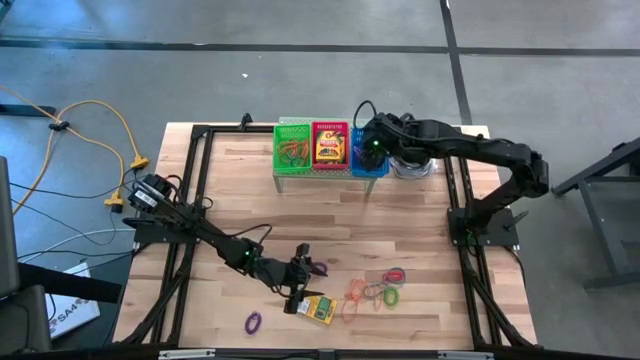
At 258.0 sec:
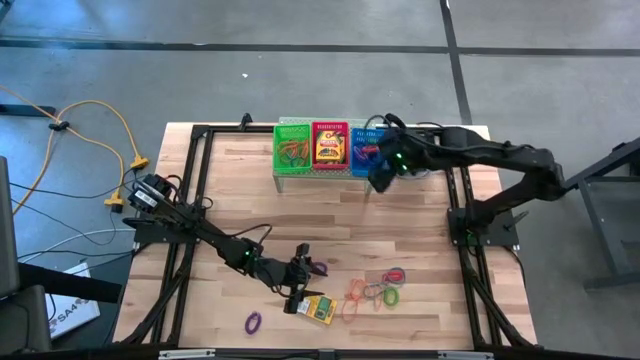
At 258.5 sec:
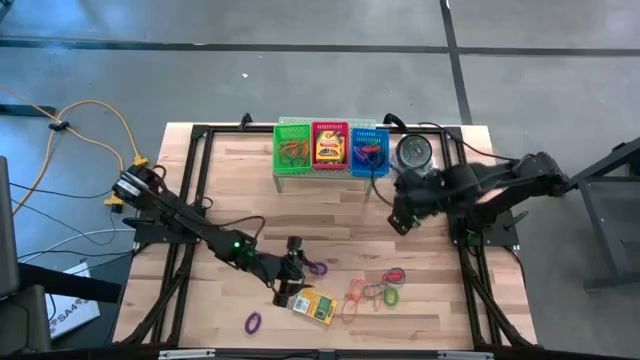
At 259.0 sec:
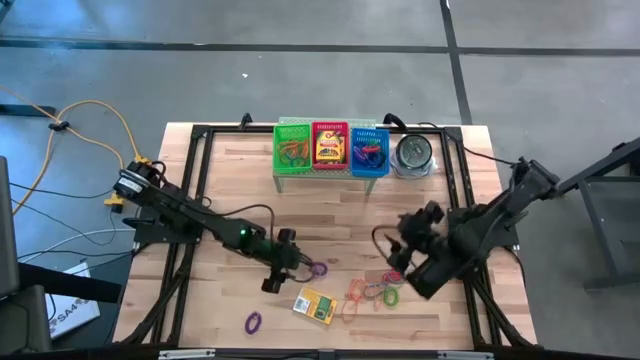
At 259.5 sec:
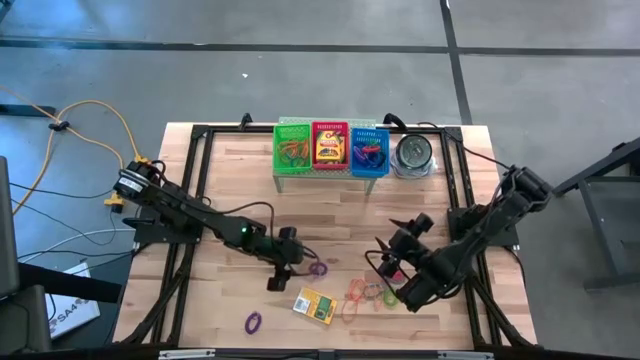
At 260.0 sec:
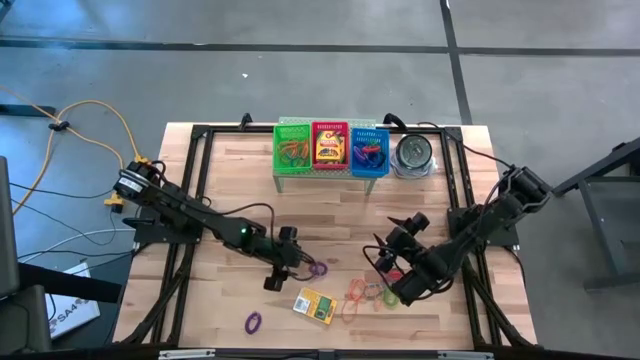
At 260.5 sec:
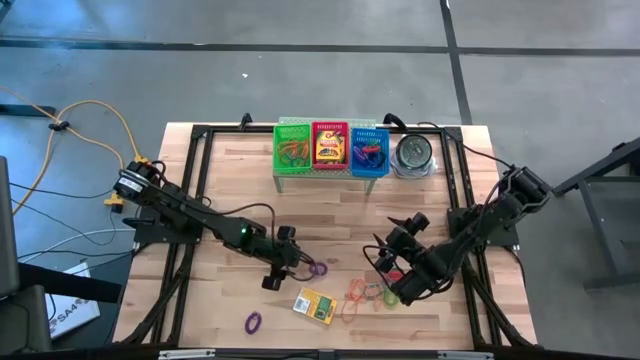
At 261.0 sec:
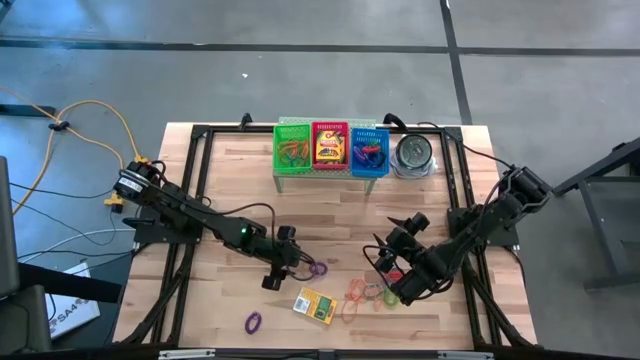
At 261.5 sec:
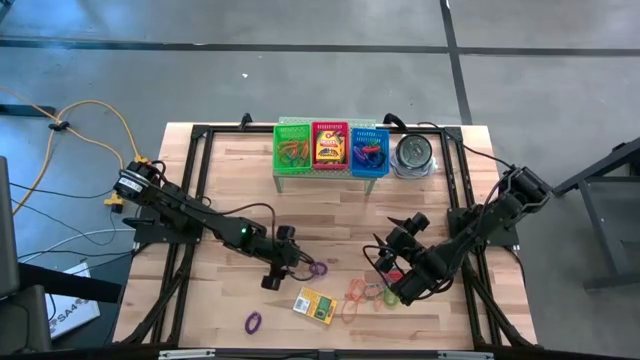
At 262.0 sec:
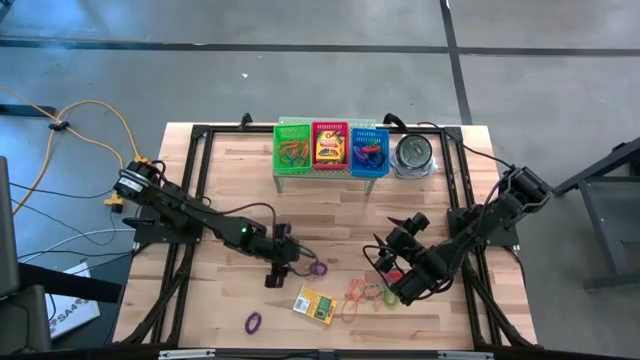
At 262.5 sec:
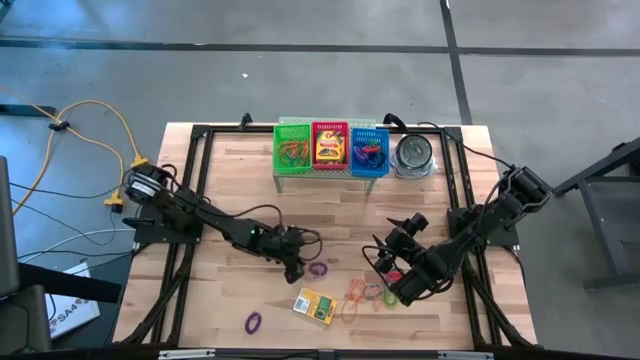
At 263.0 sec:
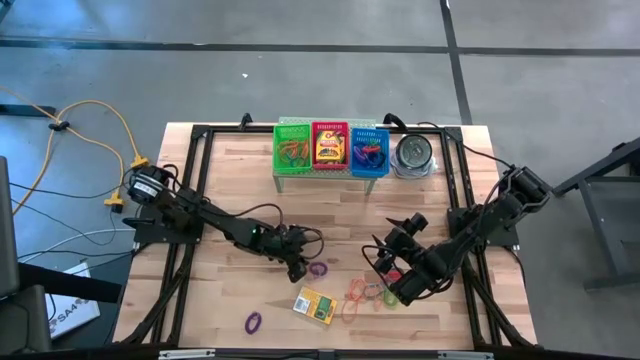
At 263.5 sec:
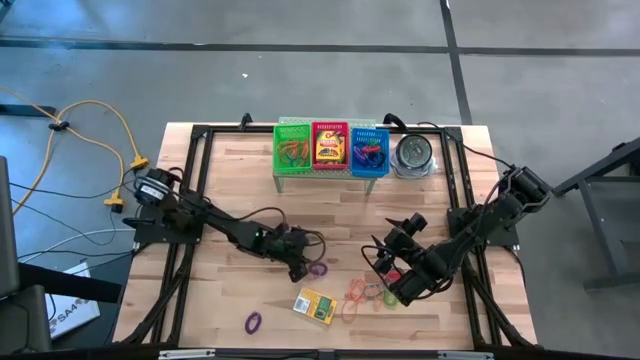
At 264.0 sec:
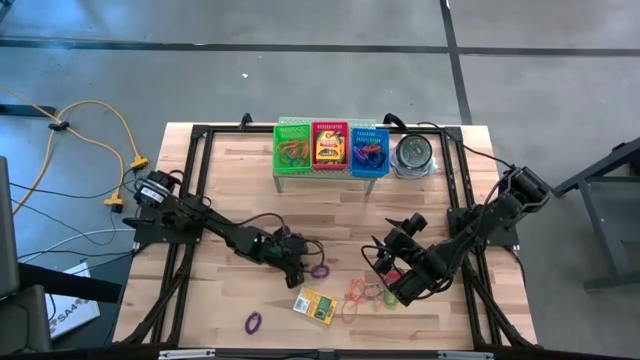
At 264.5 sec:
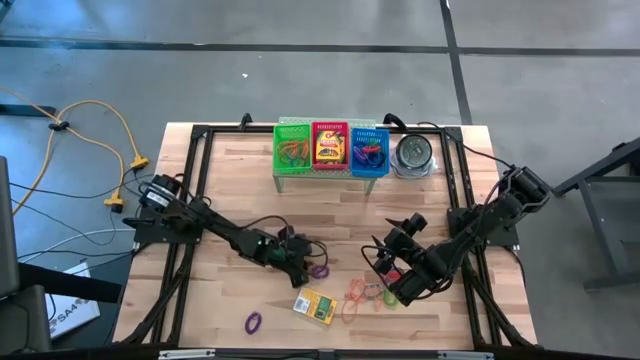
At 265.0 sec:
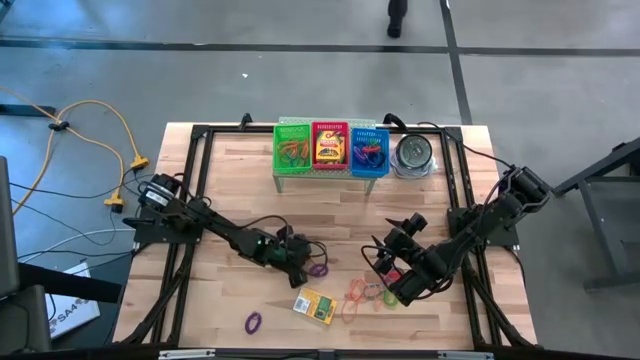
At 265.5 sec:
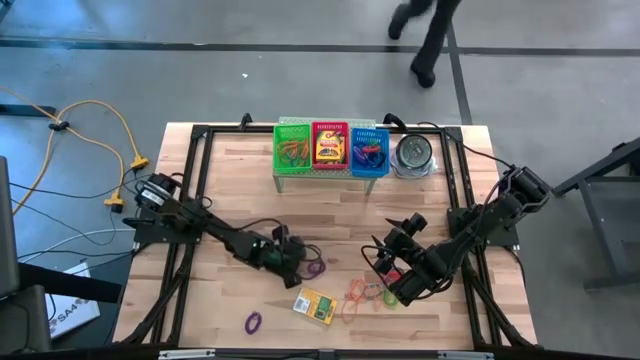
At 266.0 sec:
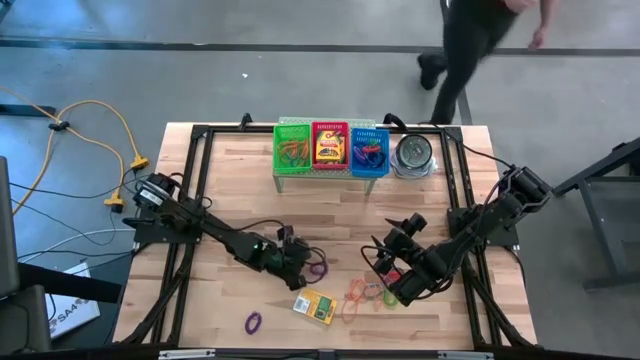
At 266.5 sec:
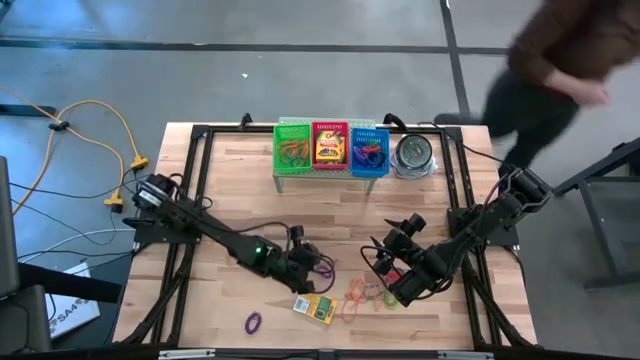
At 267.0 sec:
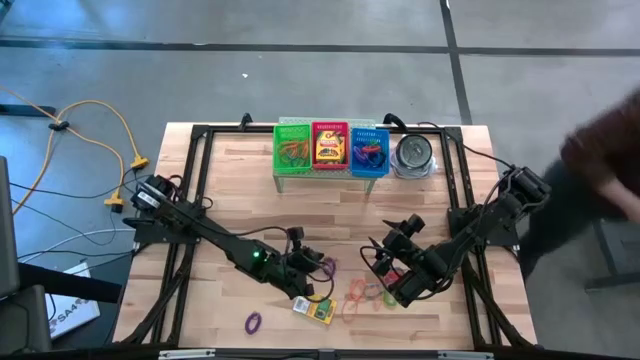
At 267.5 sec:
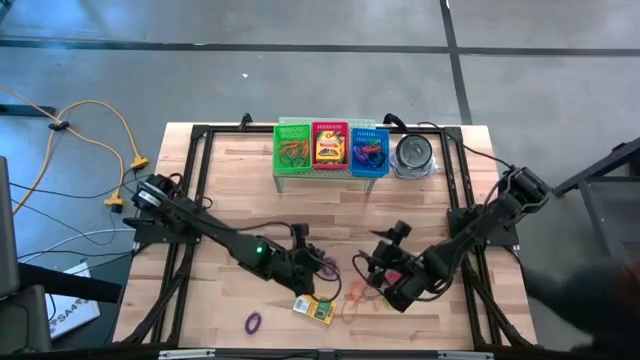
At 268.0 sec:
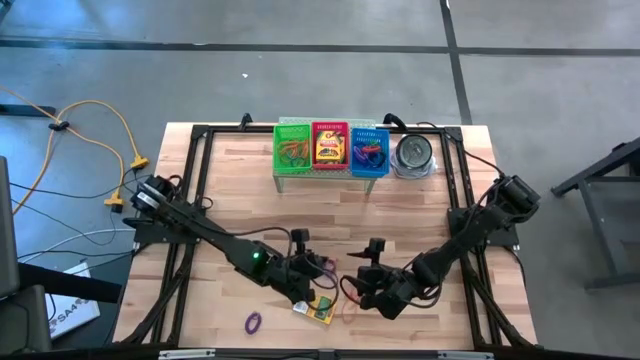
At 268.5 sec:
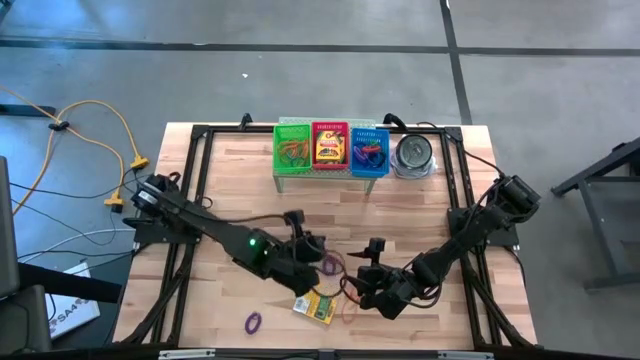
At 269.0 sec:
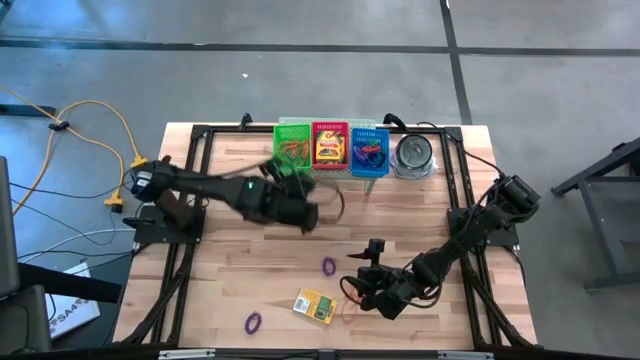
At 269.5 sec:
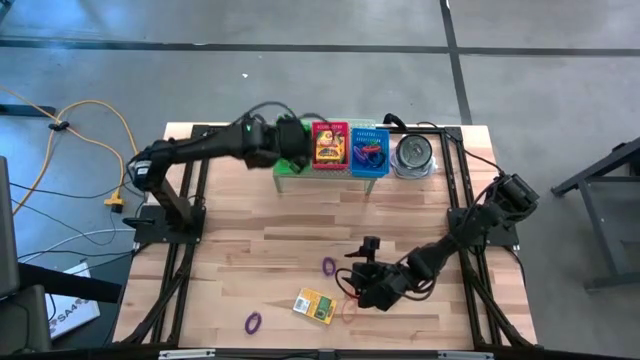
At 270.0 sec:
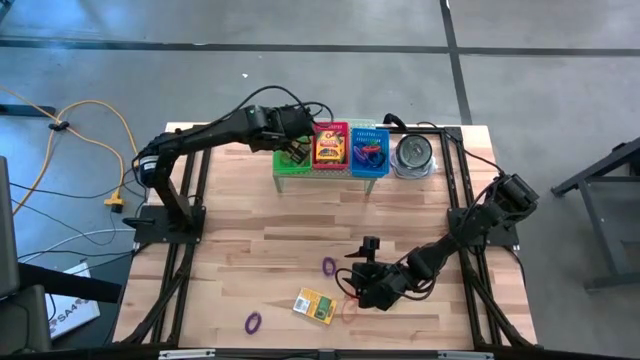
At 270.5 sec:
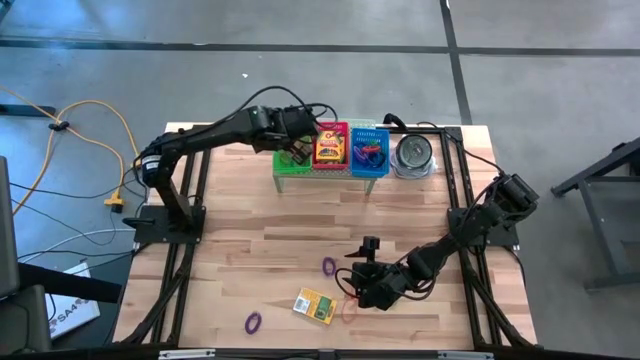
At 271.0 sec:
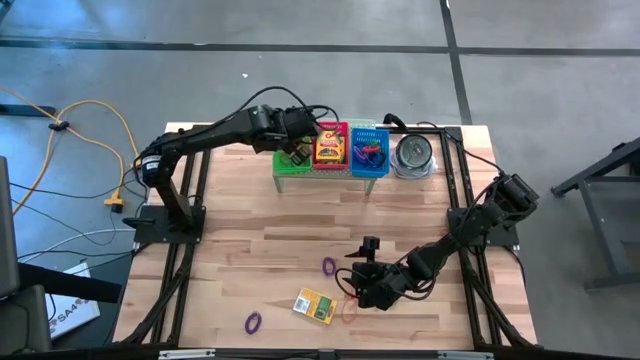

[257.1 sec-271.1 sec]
Task: Pick & Place Office Desk Supplies
Put the orange rubber band into the green bin on the shelf
